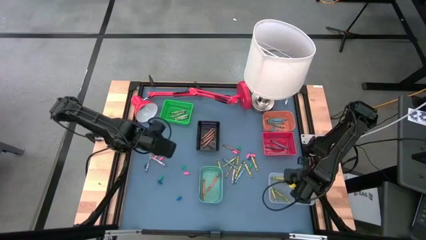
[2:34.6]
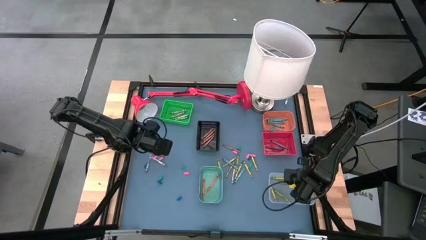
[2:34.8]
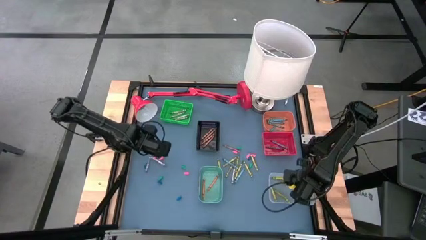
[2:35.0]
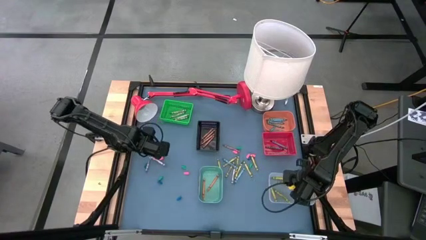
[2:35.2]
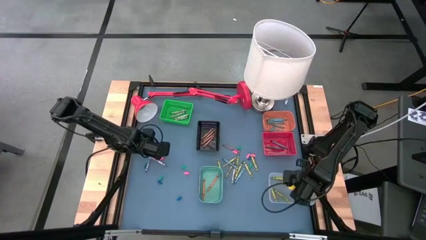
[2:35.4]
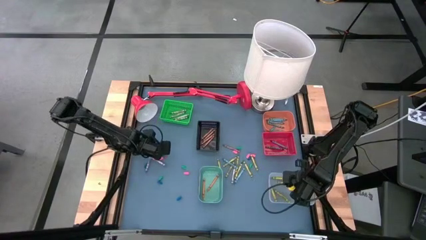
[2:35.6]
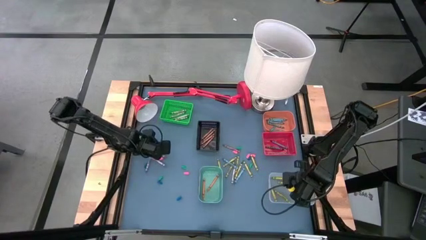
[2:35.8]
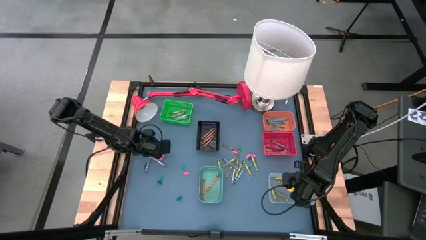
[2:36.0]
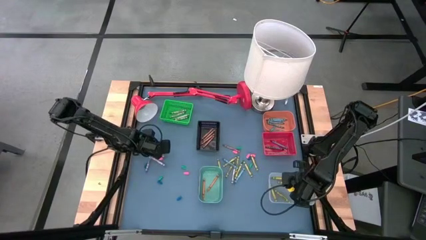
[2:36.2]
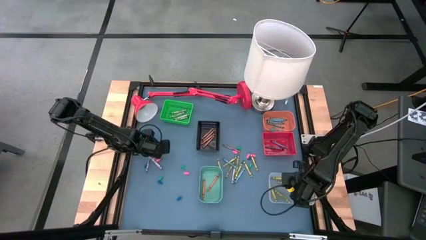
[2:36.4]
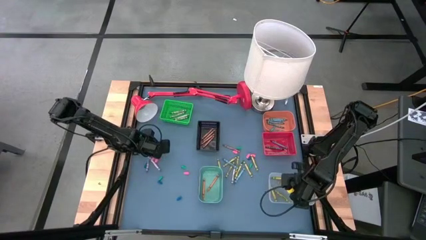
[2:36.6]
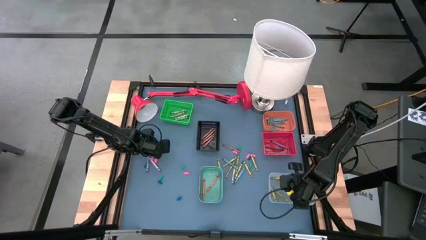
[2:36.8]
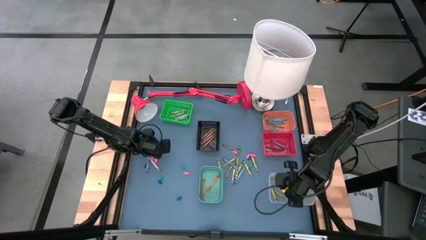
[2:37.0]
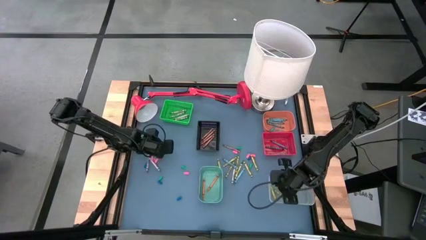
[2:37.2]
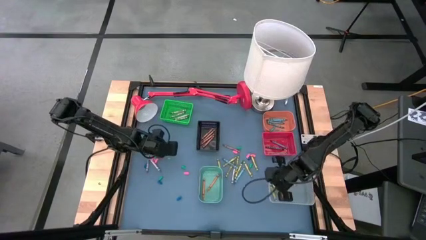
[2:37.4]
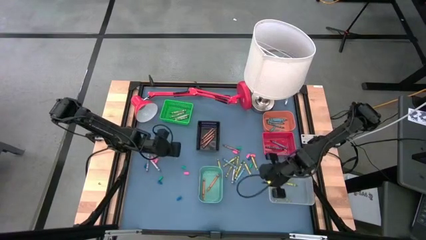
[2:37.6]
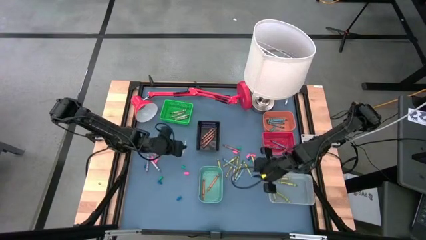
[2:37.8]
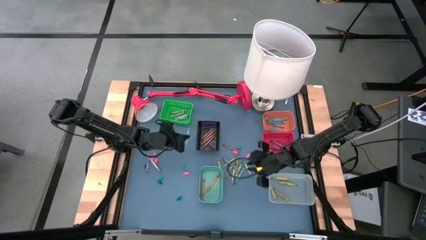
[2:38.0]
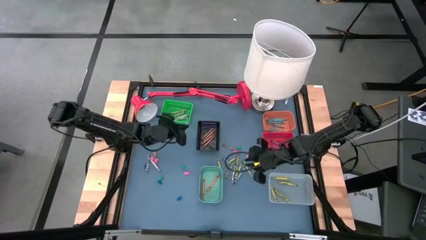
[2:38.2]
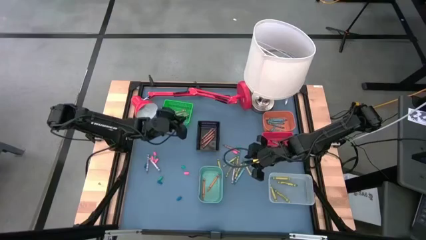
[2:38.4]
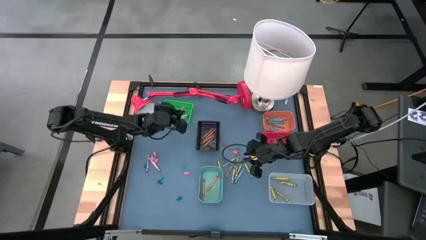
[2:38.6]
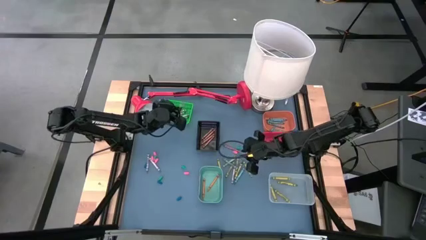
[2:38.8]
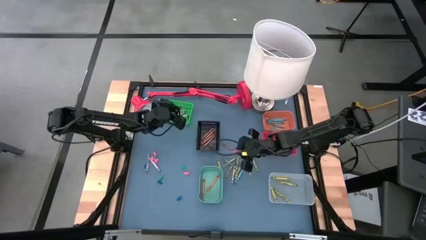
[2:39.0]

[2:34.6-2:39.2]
Task: Sort crayons
Put the gray crayon into the green bin

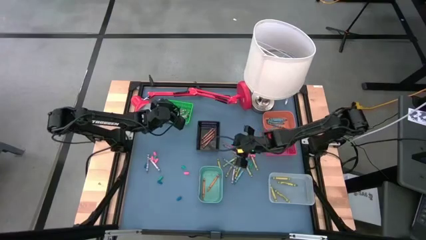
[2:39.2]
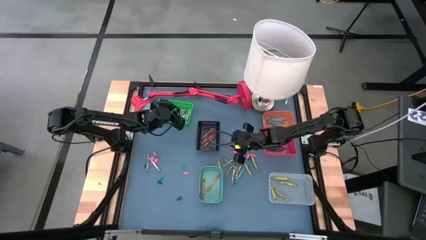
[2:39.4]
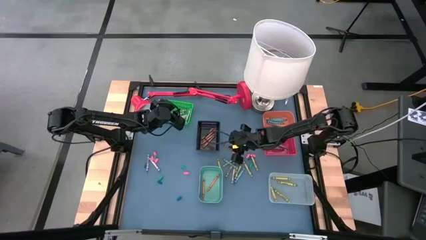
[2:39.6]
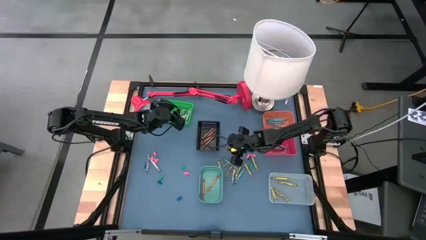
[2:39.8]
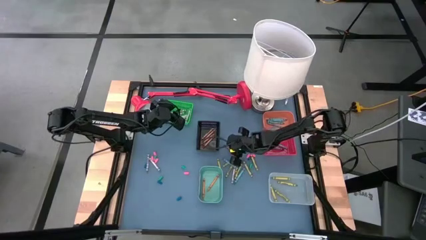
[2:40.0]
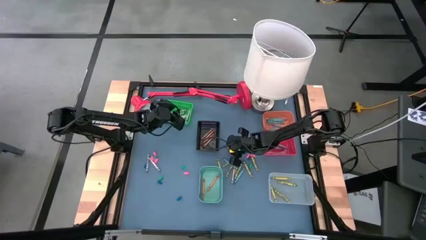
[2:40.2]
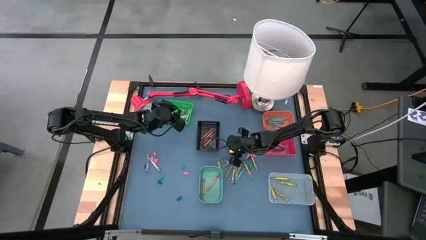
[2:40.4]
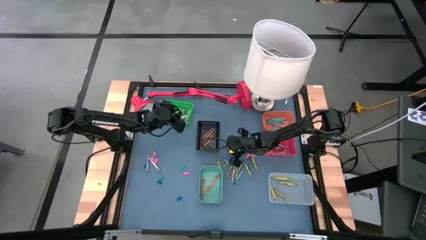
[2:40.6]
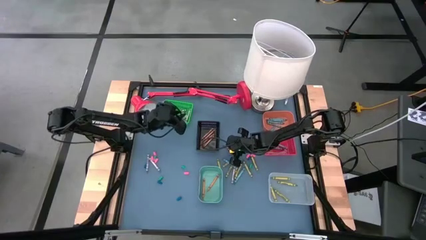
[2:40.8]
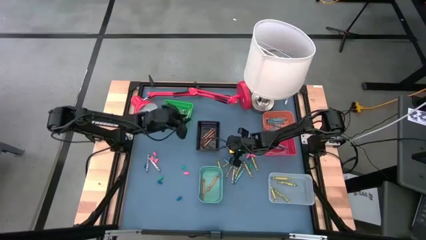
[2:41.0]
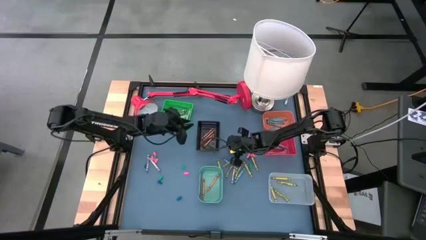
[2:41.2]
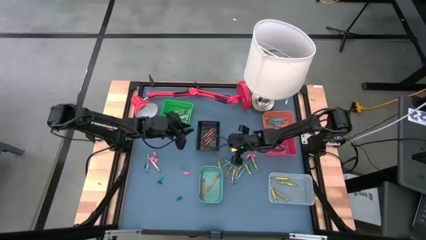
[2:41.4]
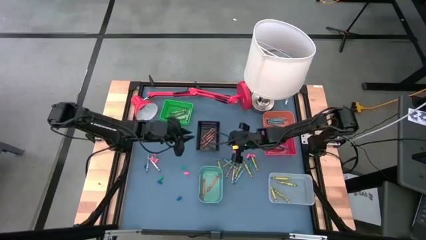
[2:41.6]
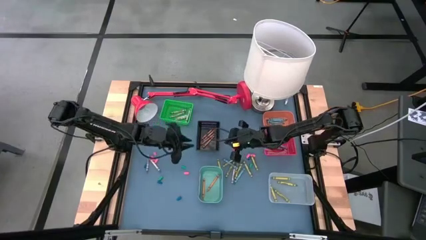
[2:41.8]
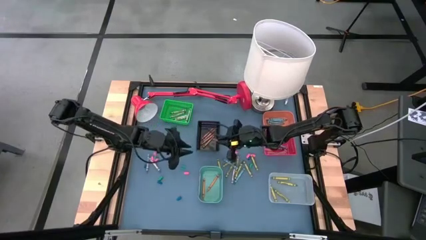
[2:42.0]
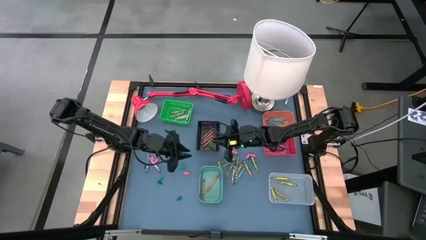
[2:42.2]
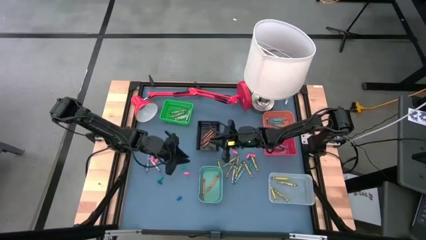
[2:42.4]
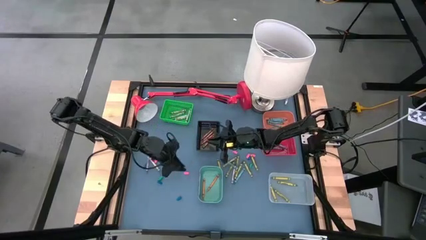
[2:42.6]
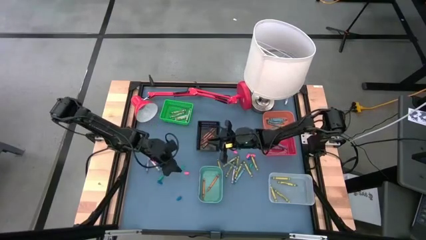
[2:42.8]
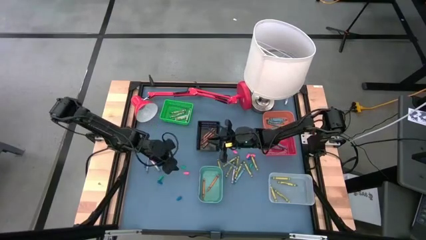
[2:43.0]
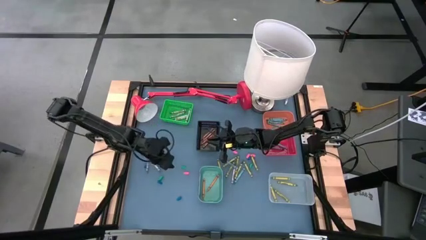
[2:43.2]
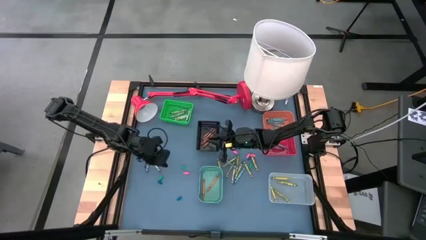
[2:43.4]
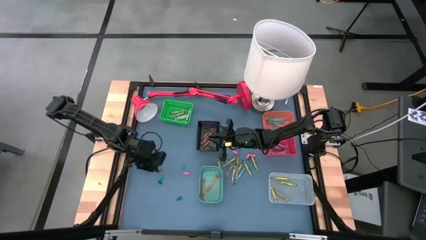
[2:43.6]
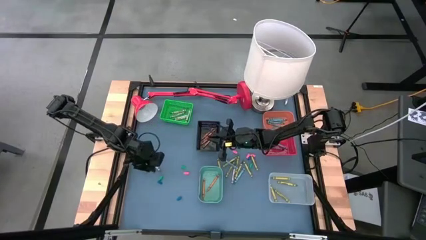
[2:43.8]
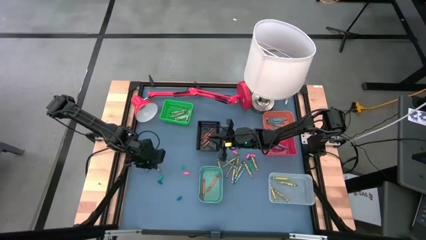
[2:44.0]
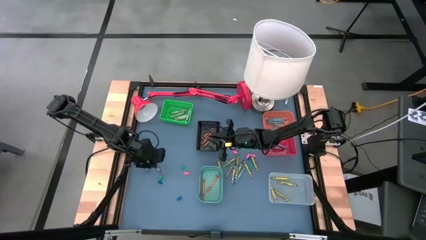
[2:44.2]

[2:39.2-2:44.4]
Put the brown crayon into the black bin

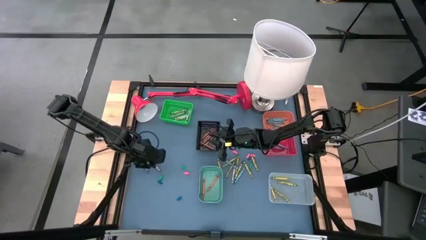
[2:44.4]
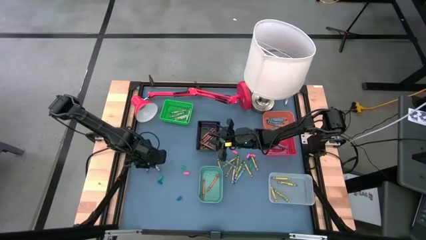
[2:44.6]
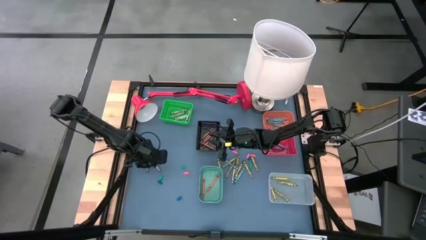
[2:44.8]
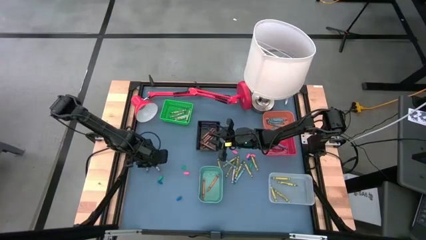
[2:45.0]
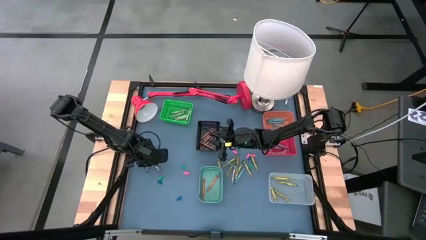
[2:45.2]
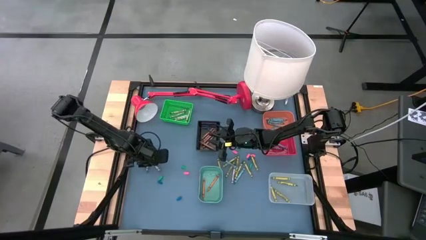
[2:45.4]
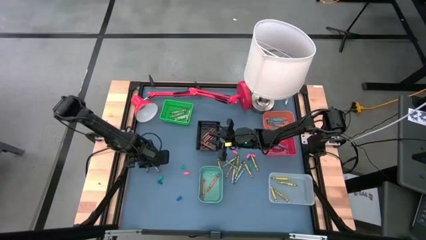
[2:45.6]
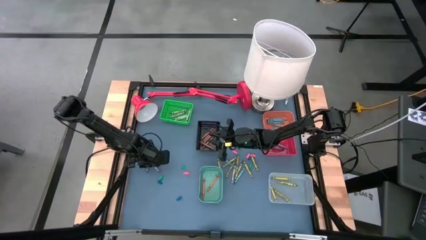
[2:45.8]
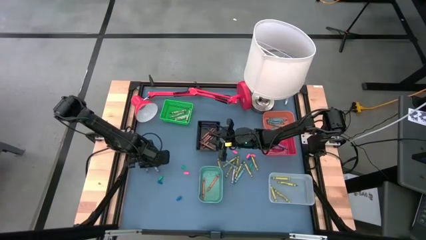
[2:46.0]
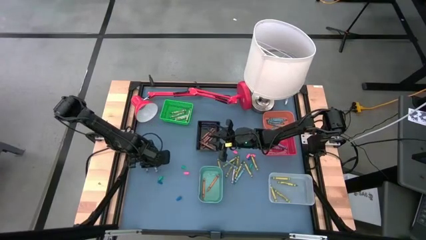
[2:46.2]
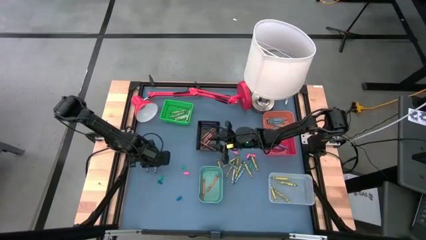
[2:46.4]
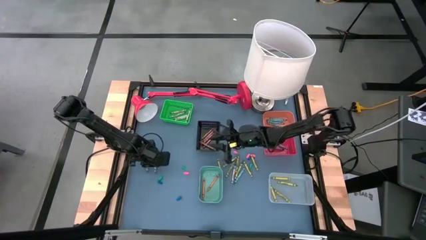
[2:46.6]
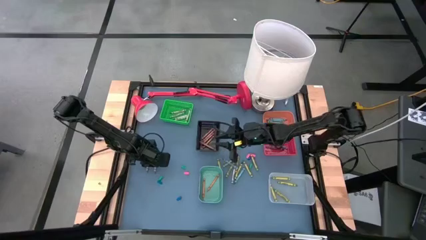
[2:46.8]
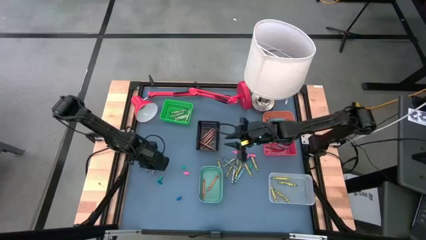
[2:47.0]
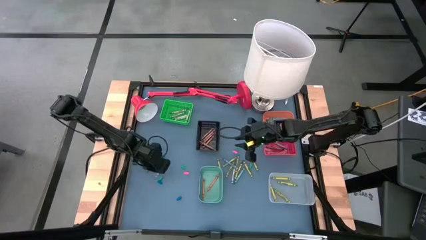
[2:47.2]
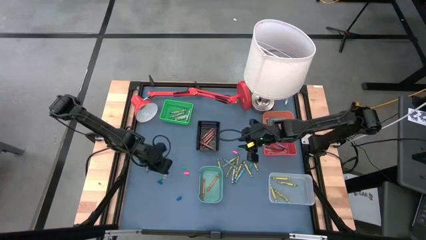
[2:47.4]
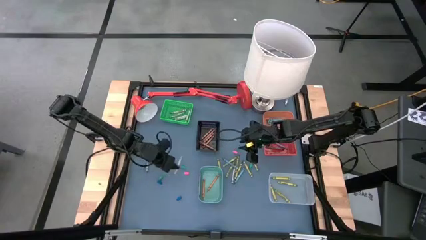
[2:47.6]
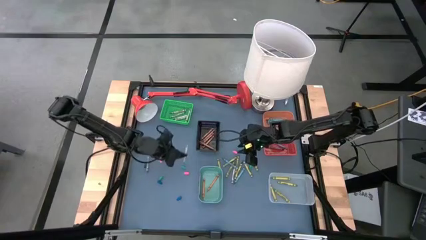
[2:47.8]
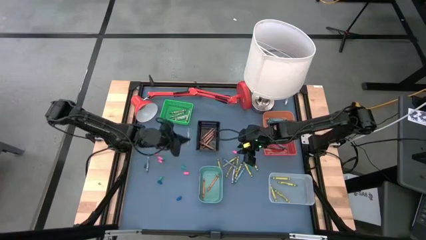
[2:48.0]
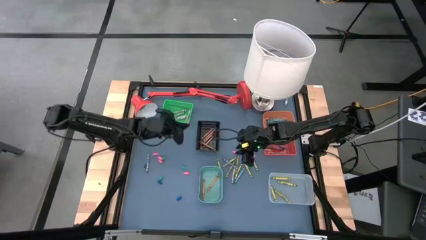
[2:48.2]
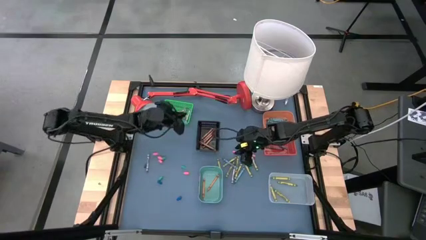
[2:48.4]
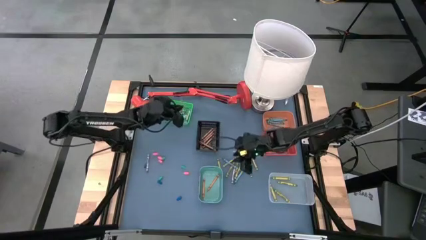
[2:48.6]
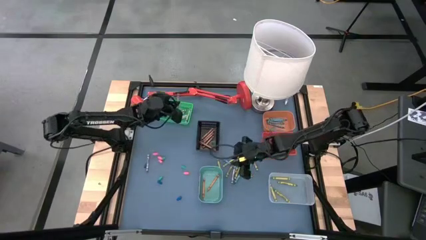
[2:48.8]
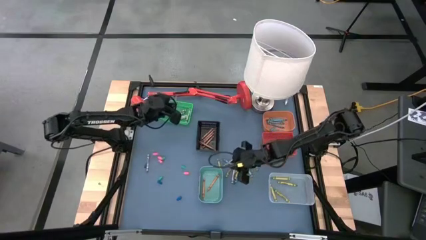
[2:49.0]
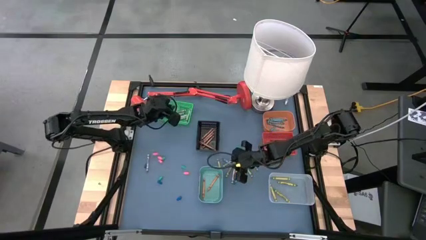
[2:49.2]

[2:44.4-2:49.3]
Put the gray crayon into the green bin

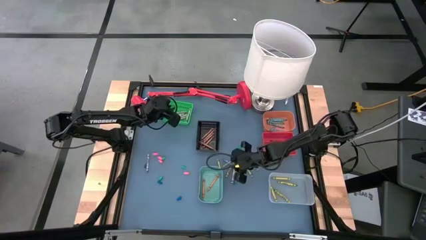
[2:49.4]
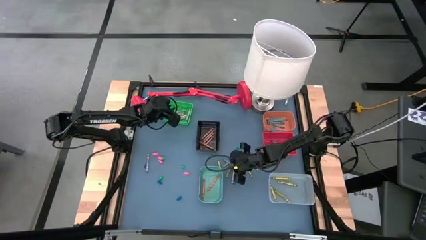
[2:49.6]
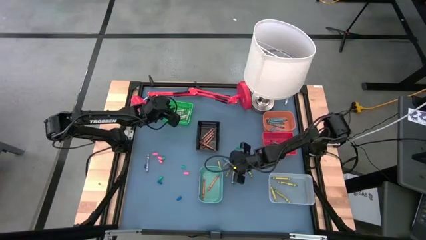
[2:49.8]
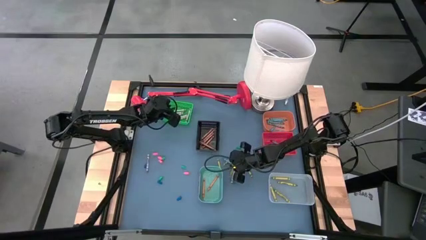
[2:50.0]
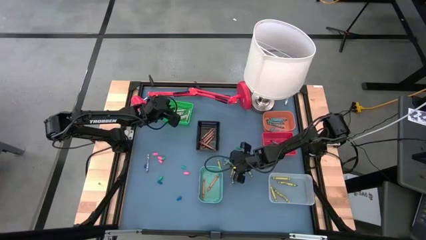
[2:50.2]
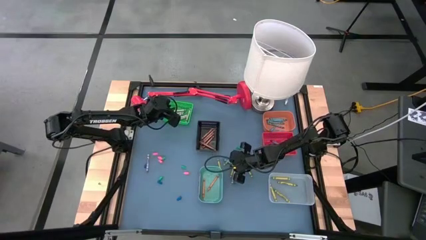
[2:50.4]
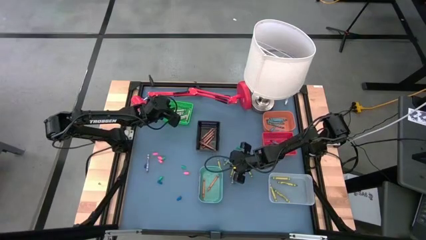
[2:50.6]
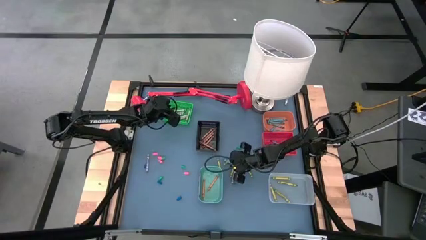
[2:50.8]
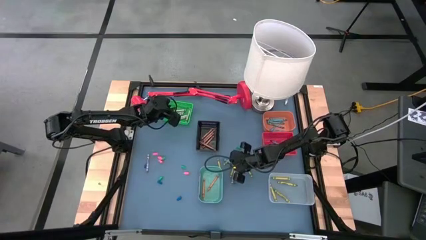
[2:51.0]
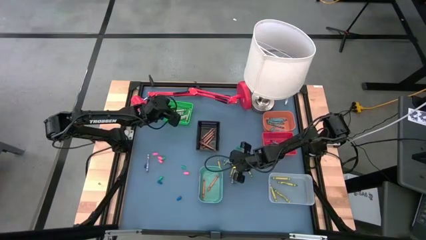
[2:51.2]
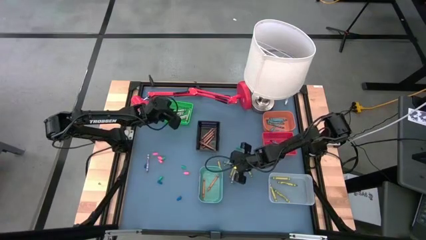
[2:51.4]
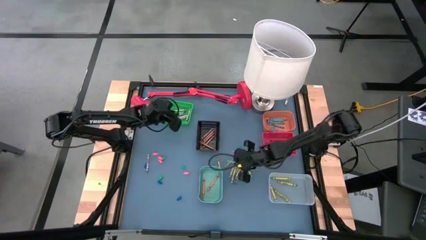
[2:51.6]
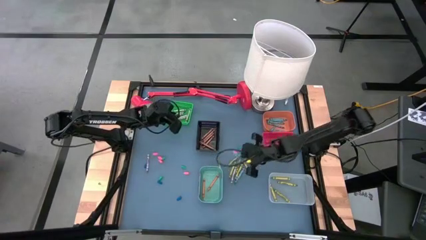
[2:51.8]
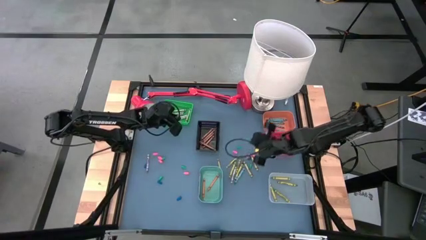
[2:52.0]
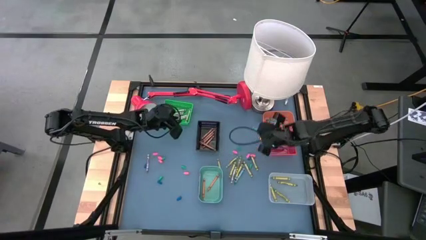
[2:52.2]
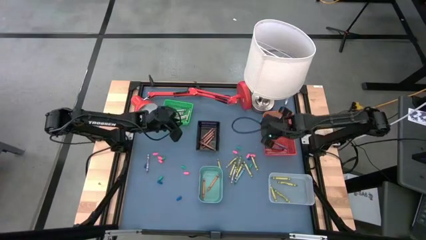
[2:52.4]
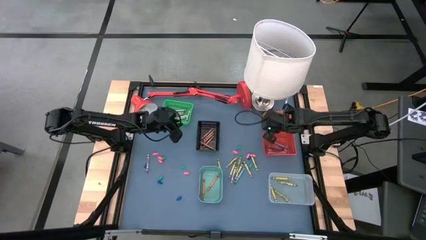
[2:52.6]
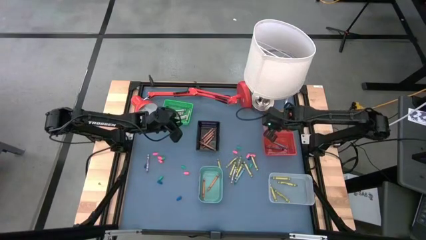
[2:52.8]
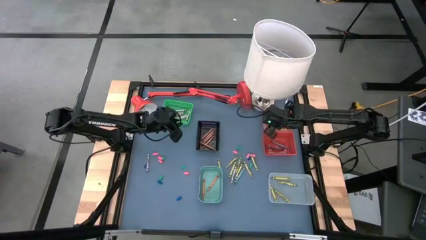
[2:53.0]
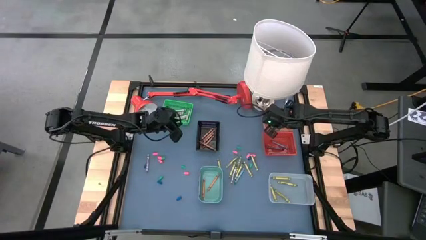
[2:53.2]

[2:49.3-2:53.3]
Put the blue green crayon into the orange bin
